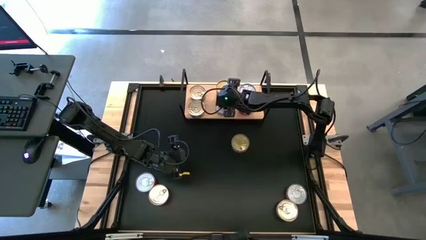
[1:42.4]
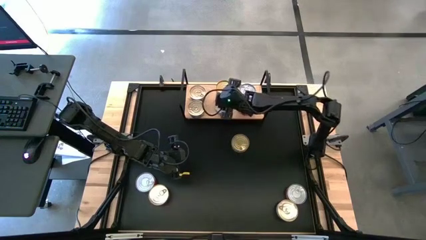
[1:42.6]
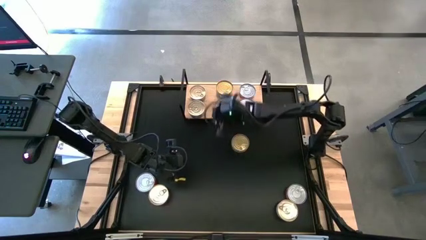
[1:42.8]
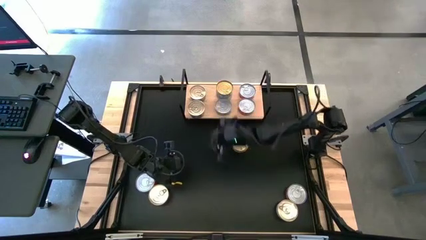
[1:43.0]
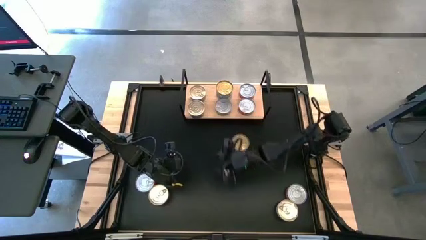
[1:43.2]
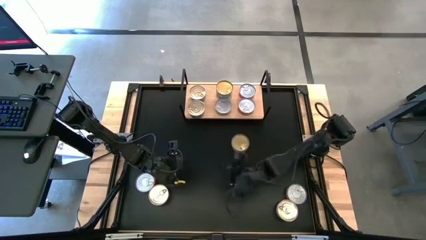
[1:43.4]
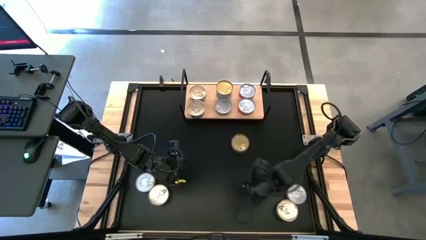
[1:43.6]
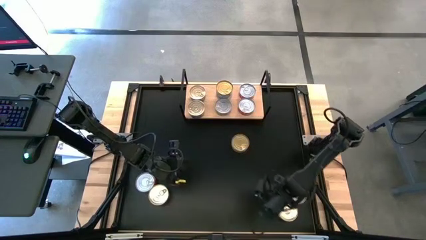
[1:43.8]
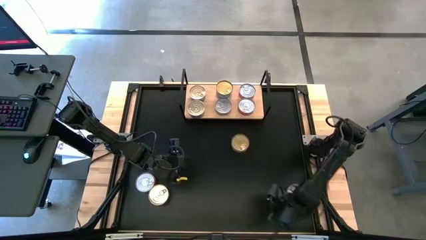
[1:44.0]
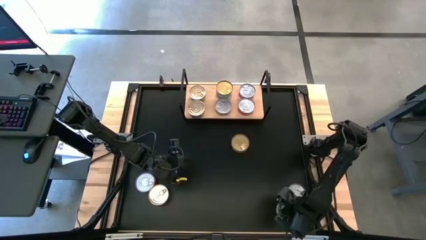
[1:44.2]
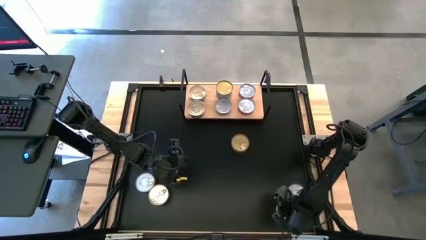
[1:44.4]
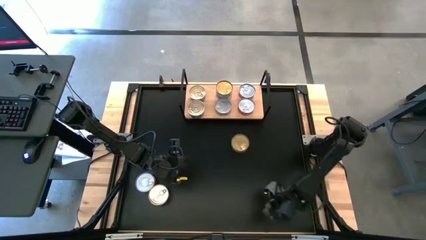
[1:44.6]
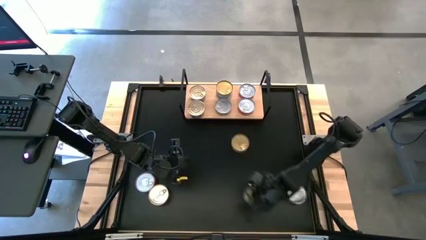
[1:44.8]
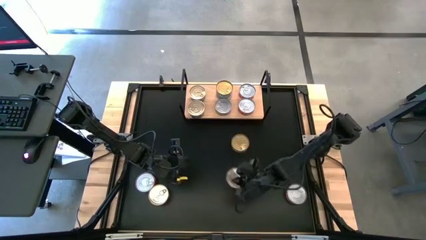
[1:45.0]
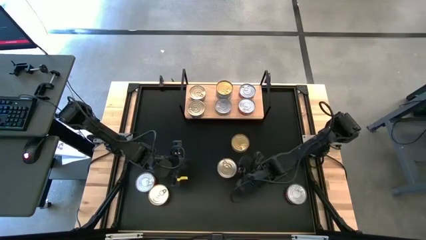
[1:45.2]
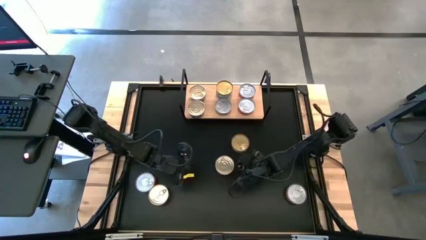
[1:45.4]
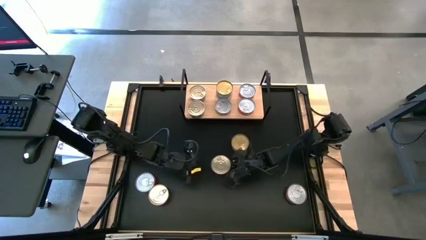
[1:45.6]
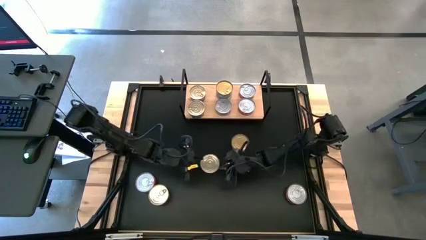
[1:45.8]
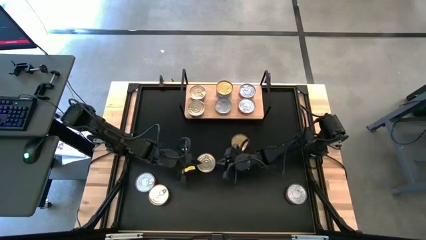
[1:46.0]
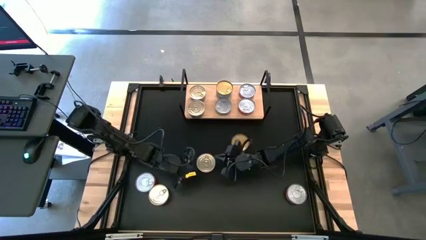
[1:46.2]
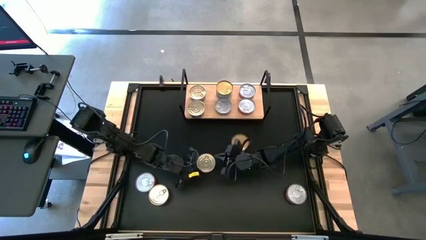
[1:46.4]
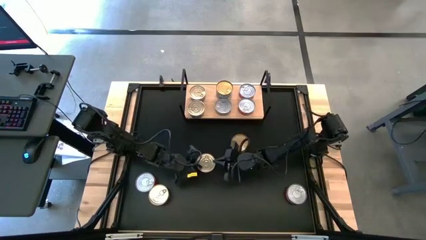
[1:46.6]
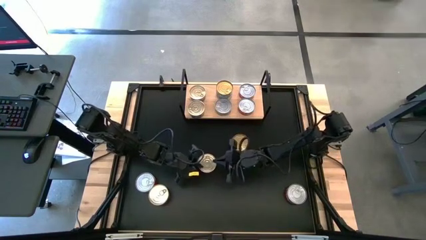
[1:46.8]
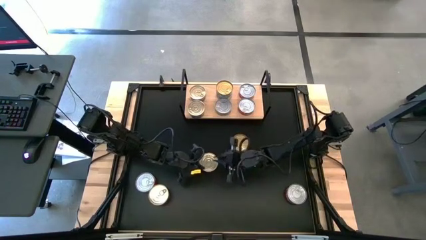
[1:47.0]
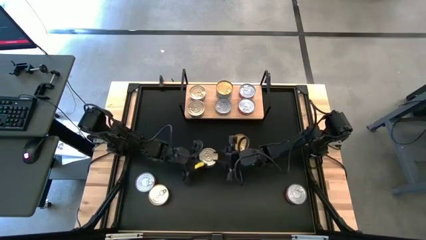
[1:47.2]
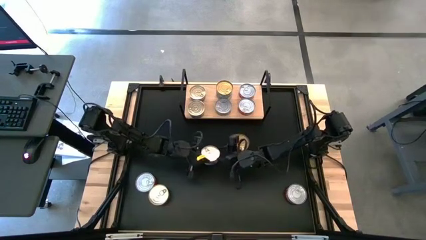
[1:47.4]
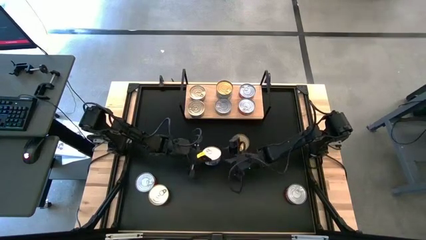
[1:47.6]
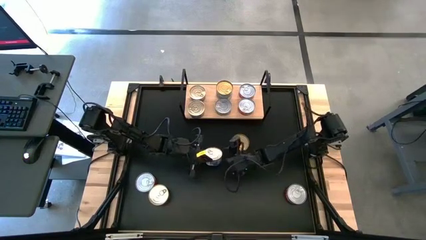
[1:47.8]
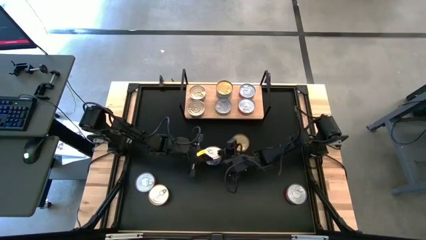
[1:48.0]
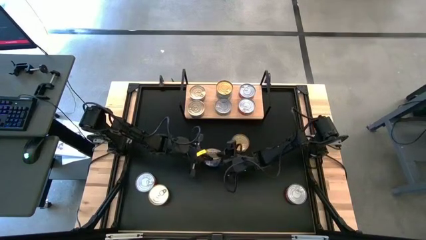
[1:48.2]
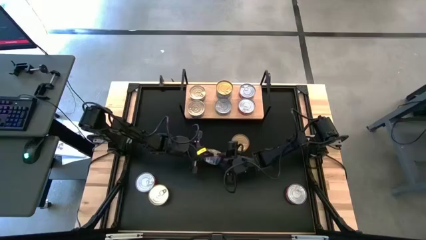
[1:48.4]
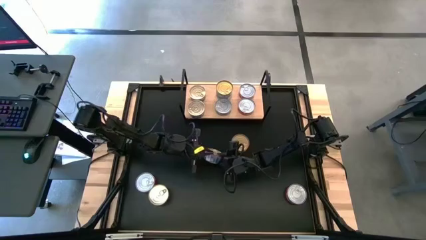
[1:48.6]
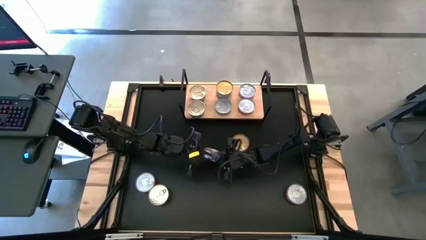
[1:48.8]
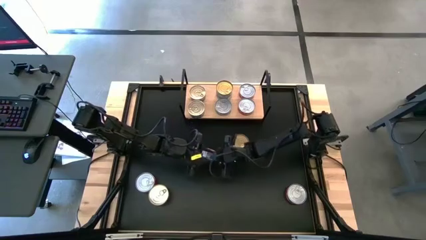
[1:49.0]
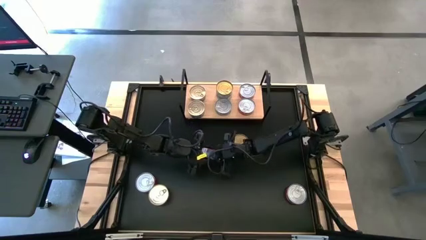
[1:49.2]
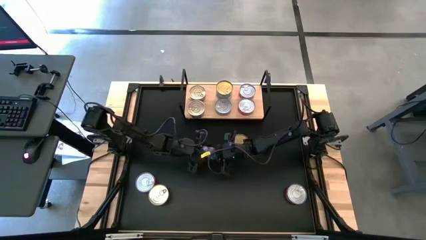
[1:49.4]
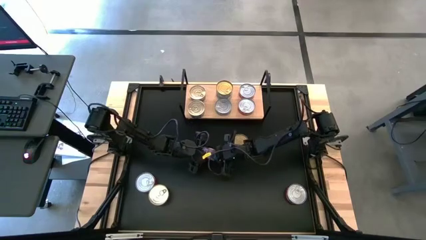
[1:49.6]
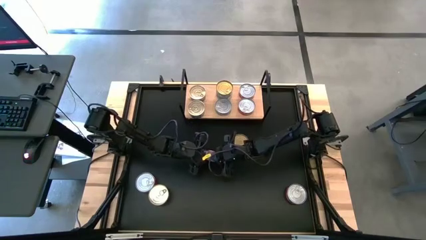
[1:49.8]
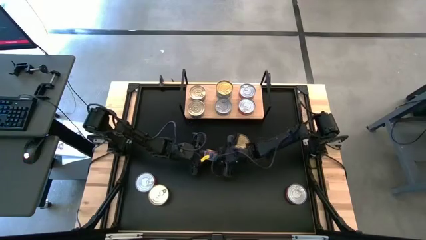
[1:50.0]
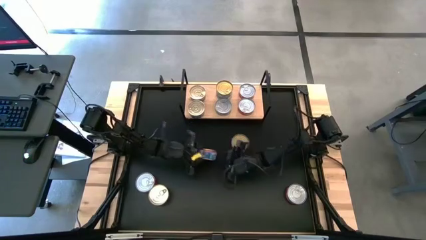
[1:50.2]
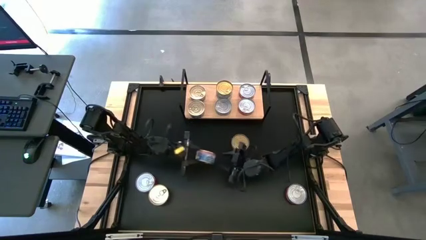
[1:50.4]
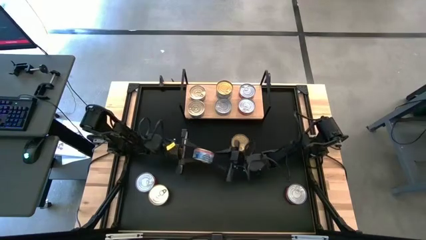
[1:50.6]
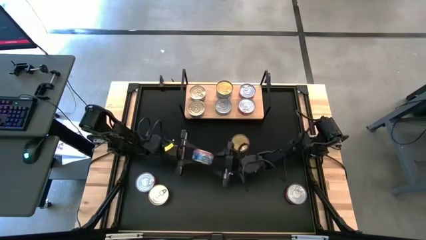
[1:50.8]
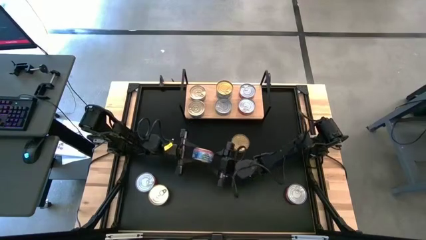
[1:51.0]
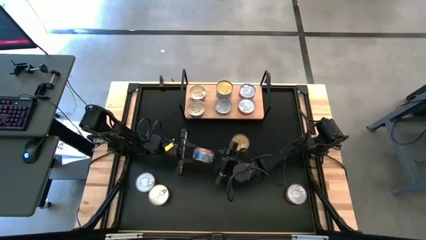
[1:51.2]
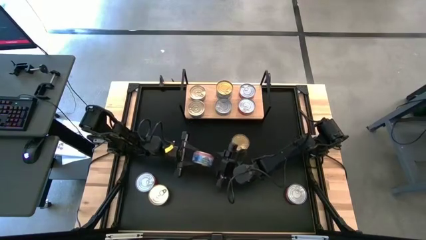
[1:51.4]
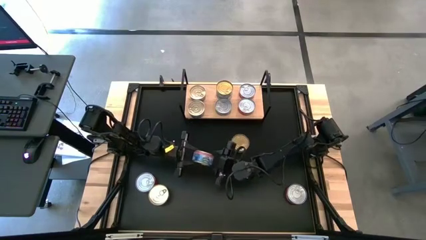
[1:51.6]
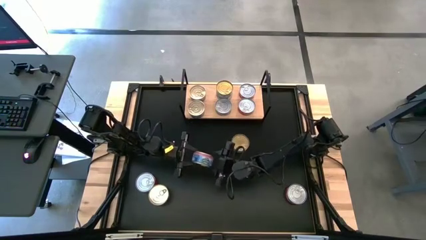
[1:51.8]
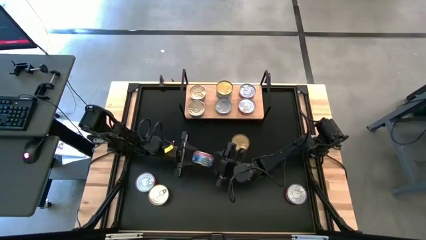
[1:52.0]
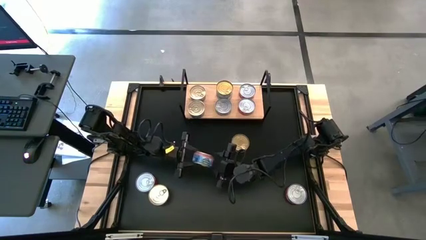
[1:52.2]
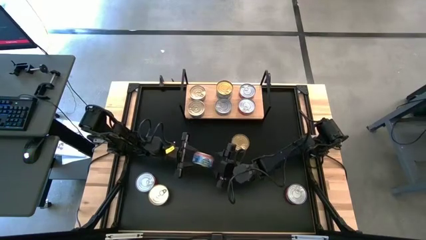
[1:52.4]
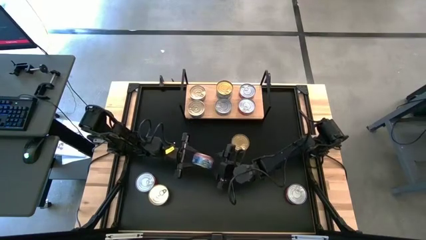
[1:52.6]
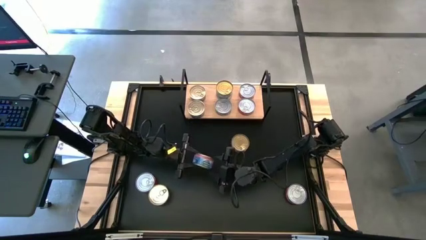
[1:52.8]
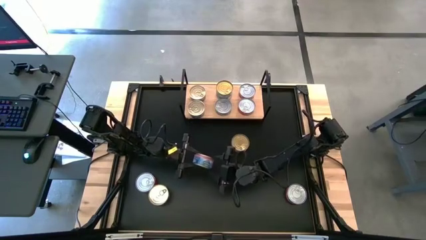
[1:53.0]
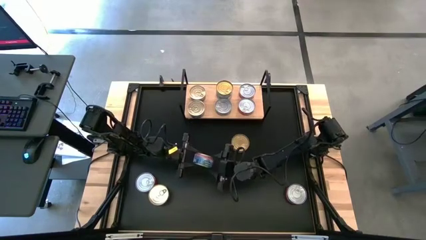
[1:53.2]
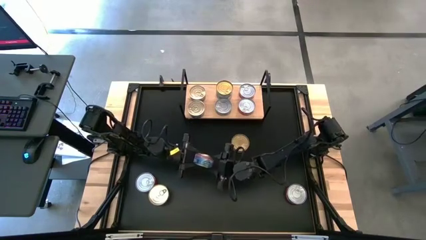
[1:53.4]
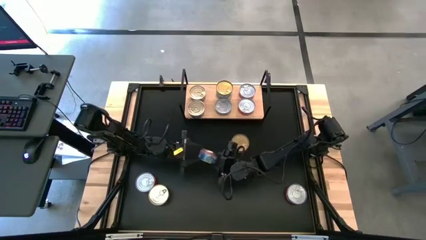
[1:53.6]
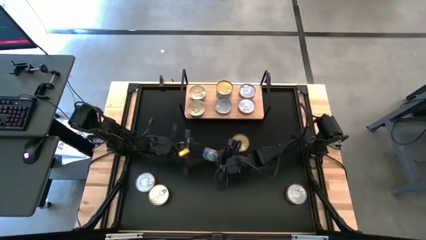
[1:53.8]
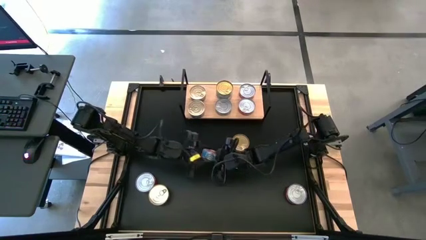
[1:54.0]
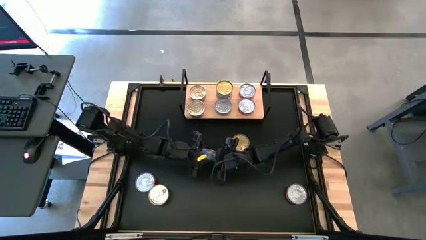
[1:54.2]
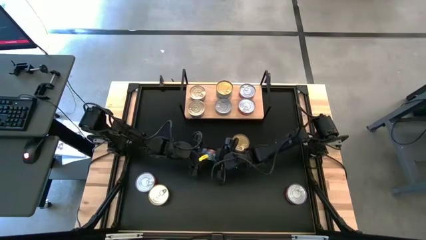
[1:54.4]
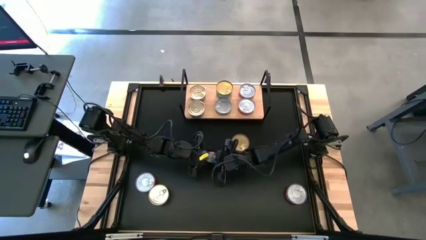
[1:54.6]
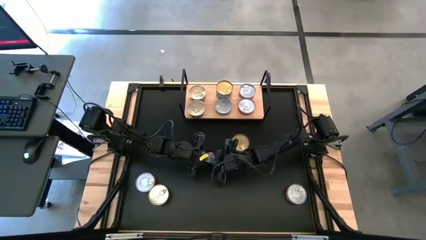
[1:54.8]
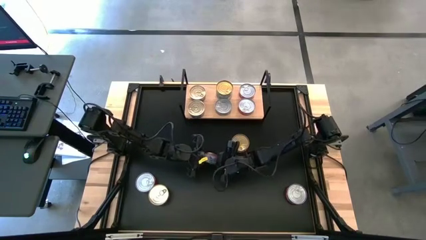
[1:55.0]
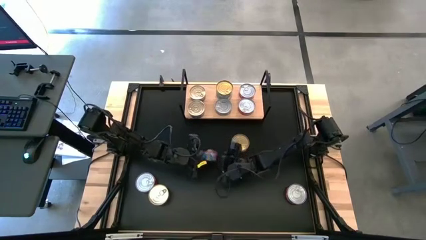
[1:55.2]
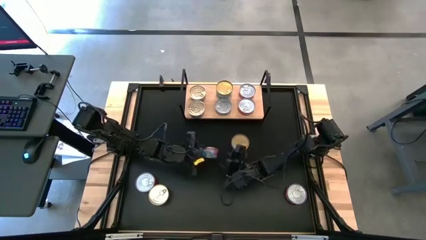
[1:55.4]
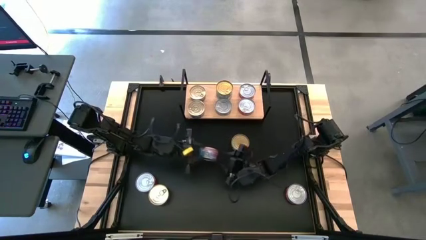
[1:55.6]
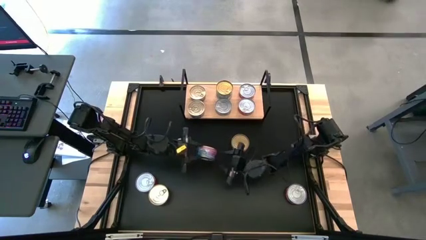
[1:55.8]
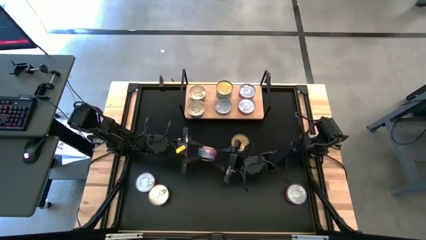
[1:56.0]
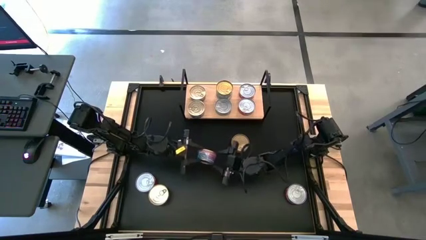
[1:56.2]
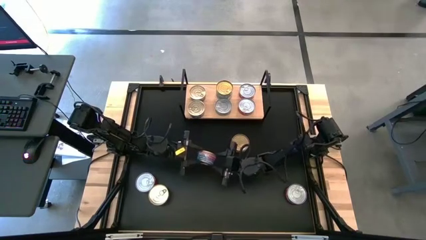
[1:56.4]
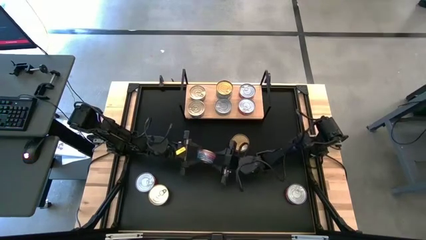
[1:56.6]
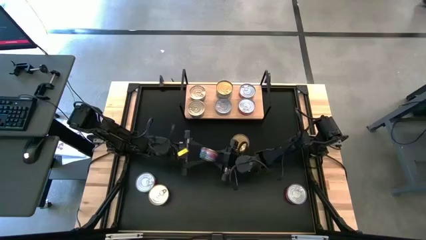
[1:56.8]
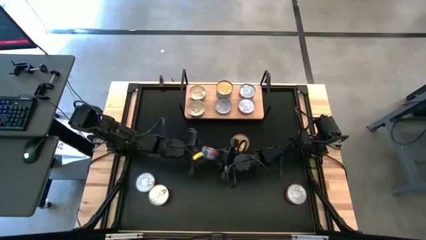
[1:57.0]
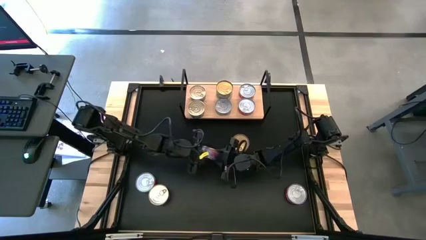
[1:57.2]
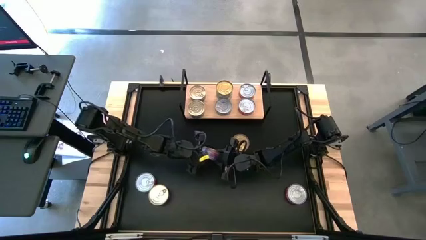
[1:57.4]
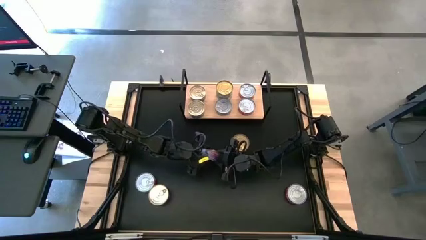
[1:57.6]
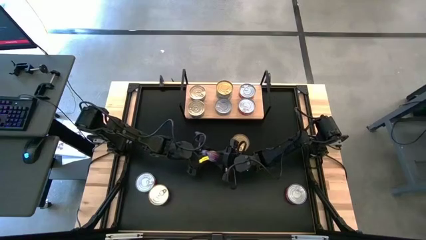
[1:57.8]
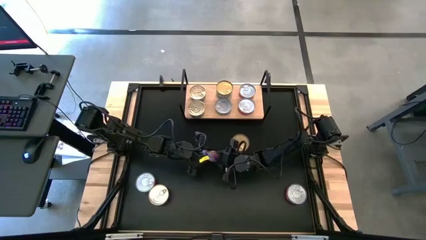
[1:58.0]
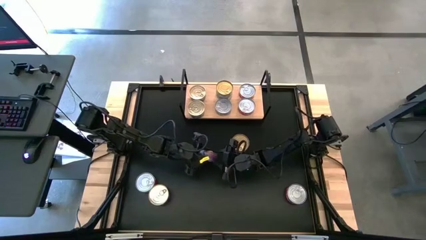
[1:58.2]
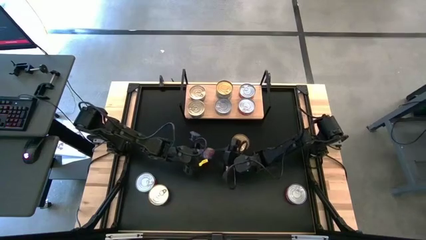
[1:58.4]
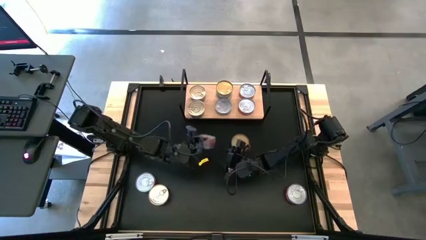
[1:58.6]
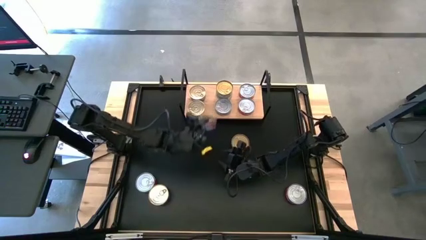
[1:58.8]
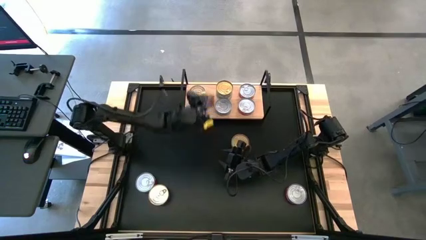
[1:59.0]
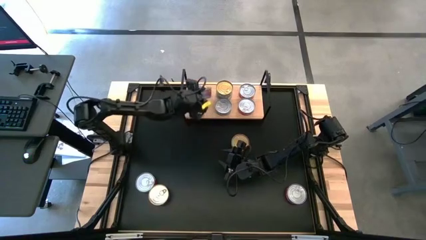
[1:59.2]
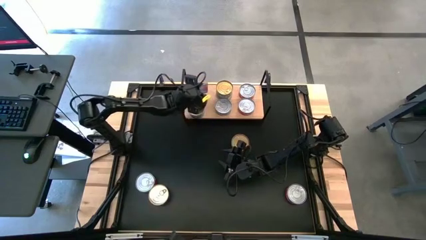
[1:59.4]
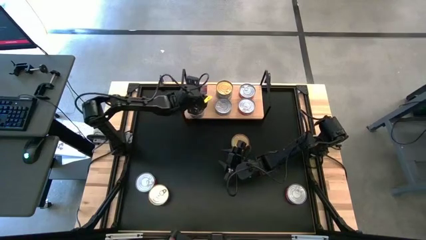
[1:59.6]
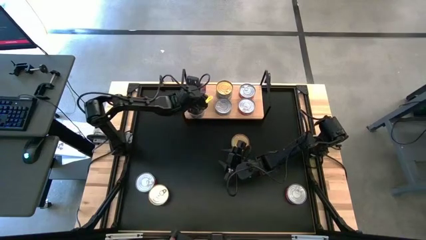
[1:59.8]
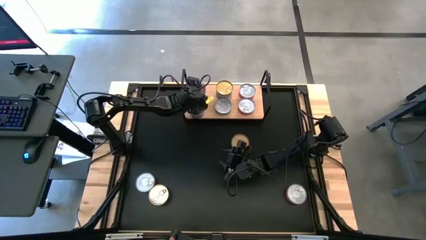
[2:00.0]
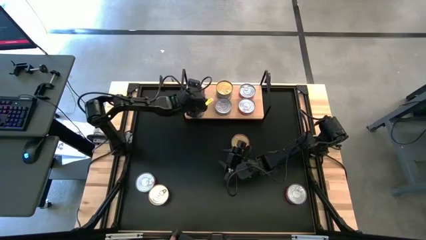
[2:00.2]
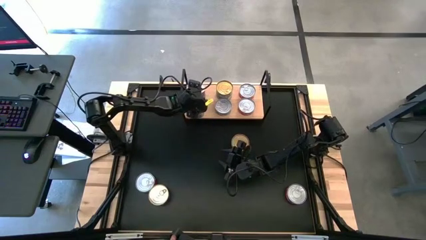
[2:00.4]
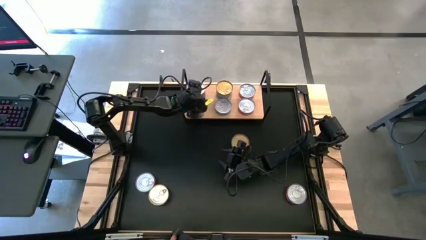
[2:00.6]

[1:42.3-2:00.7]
Task: Stack canned seafood by type on shelf
Stack the right blue canned tuna on the upper left canned tuna
